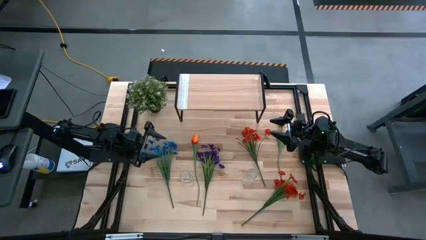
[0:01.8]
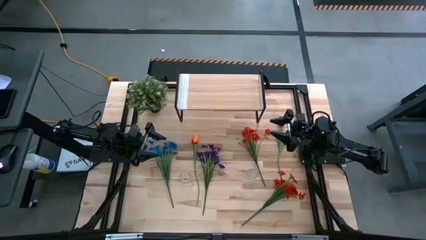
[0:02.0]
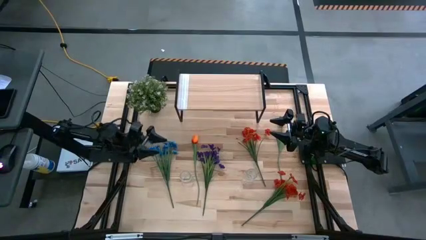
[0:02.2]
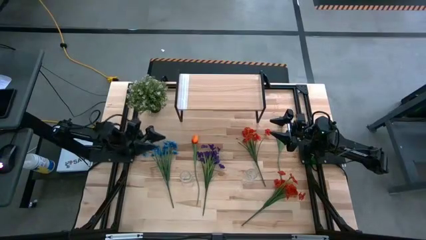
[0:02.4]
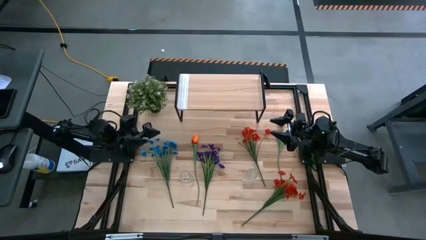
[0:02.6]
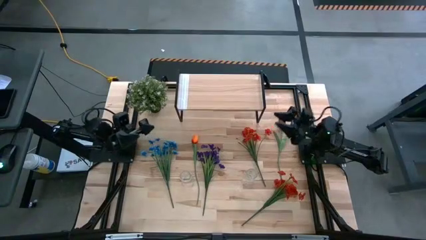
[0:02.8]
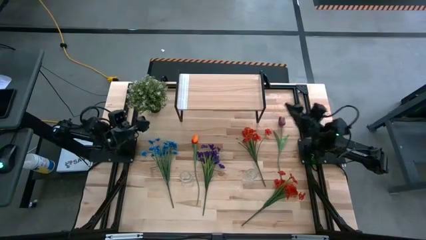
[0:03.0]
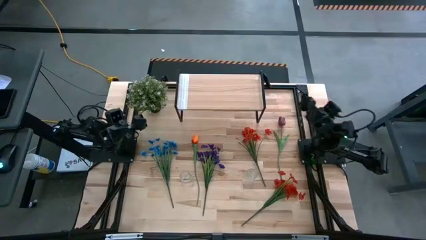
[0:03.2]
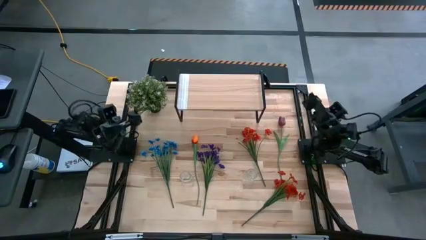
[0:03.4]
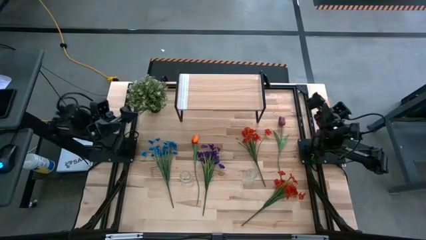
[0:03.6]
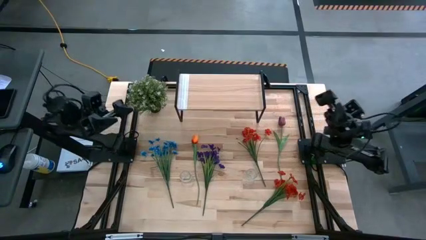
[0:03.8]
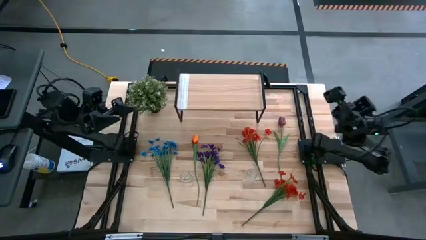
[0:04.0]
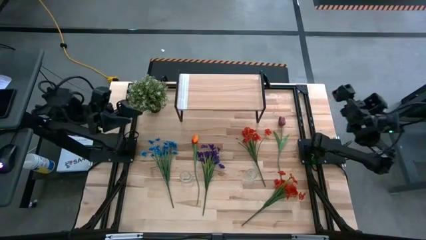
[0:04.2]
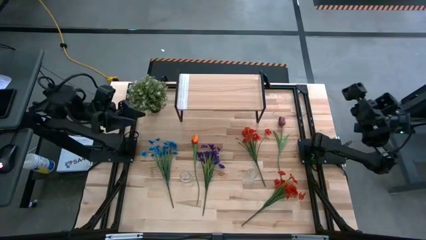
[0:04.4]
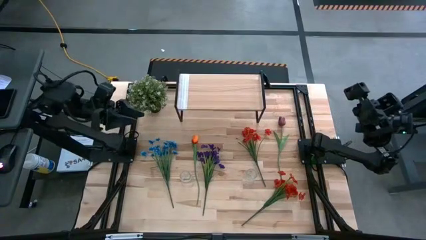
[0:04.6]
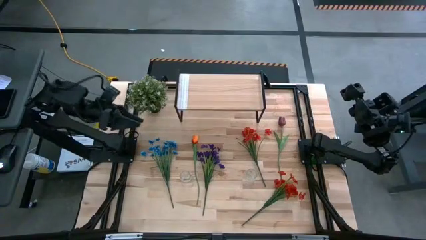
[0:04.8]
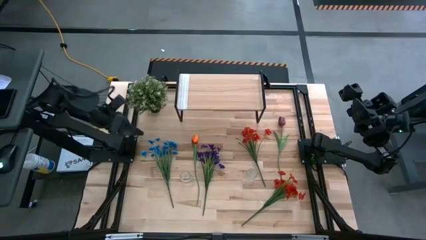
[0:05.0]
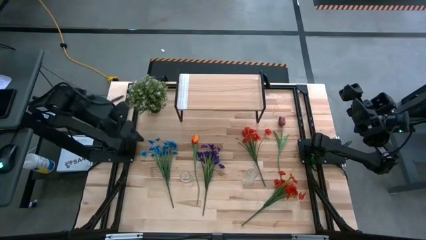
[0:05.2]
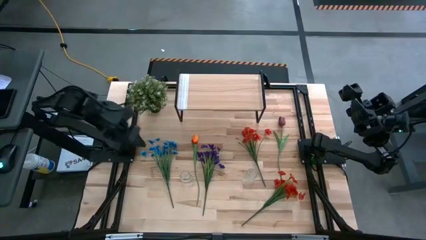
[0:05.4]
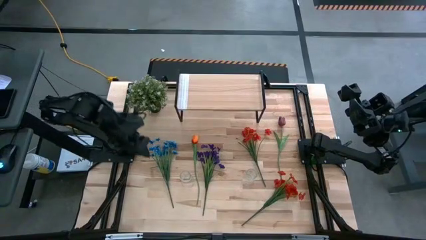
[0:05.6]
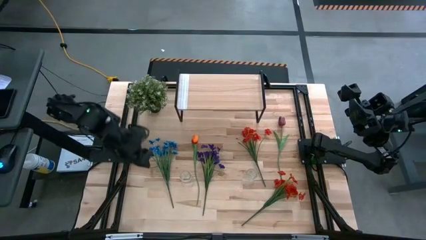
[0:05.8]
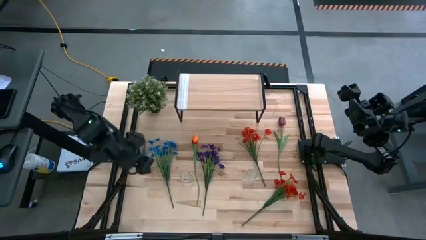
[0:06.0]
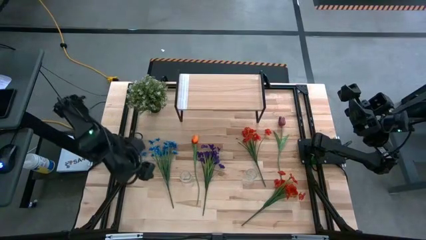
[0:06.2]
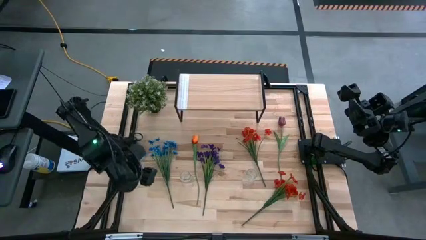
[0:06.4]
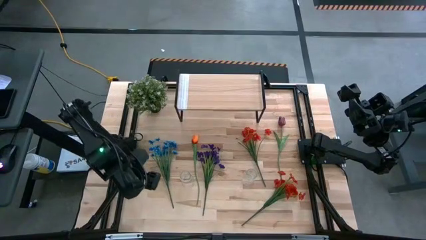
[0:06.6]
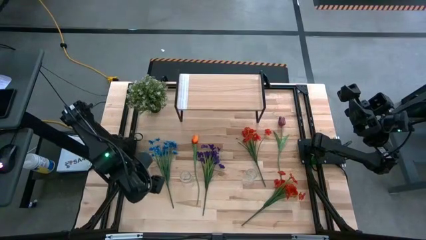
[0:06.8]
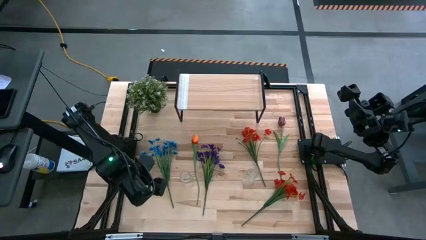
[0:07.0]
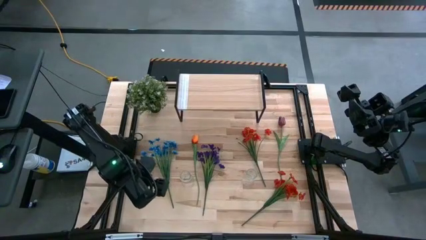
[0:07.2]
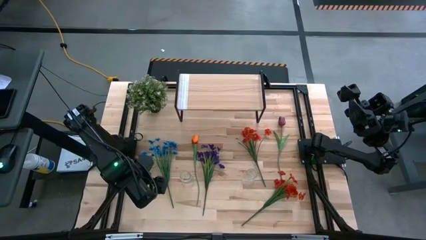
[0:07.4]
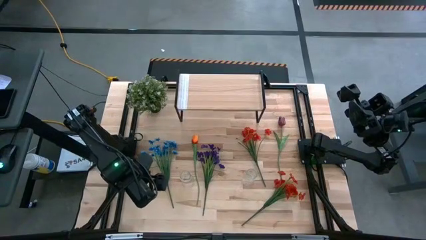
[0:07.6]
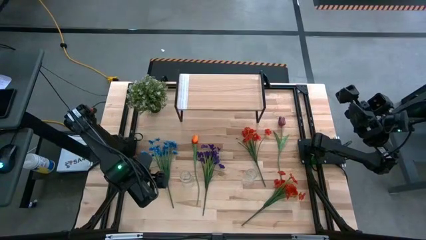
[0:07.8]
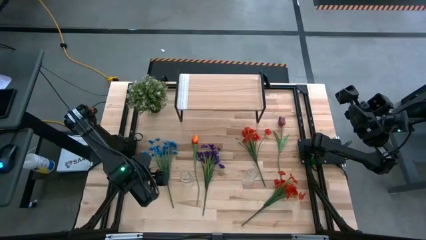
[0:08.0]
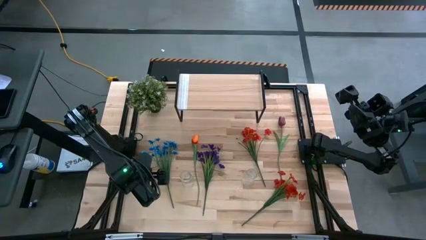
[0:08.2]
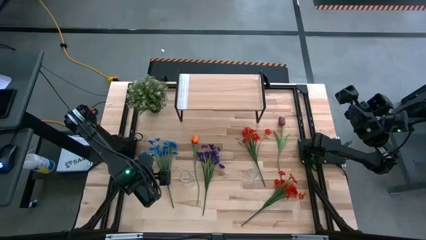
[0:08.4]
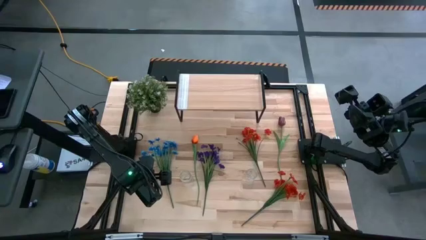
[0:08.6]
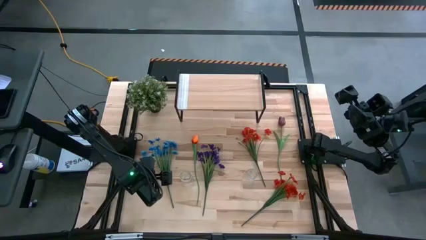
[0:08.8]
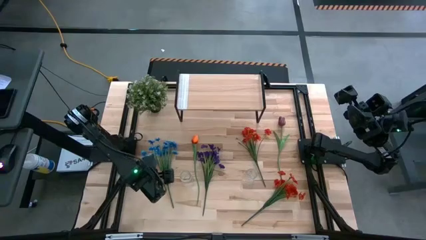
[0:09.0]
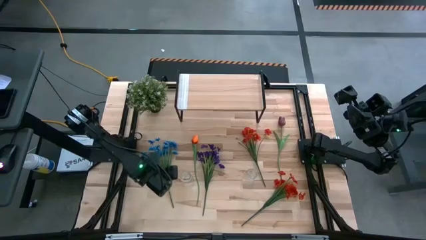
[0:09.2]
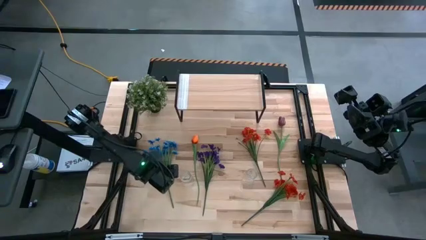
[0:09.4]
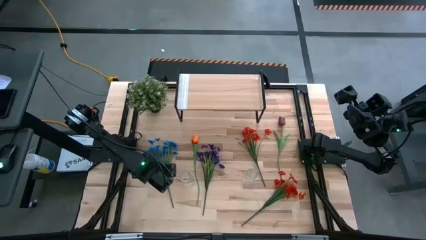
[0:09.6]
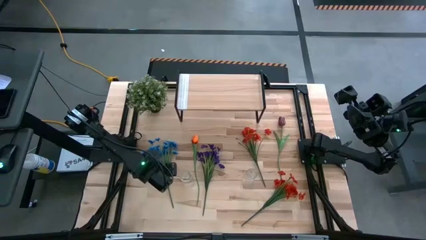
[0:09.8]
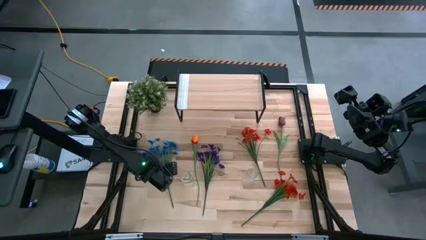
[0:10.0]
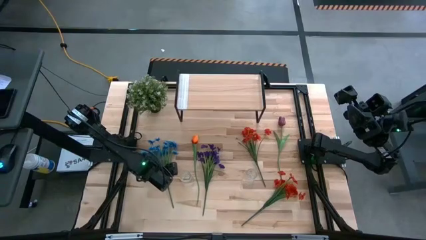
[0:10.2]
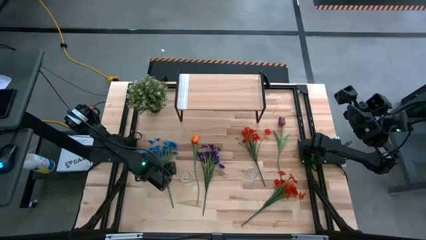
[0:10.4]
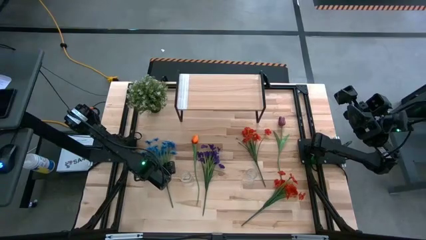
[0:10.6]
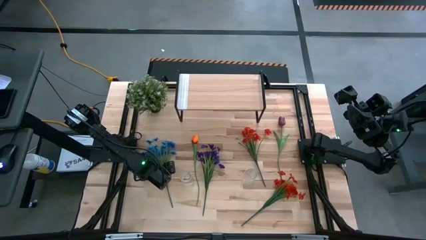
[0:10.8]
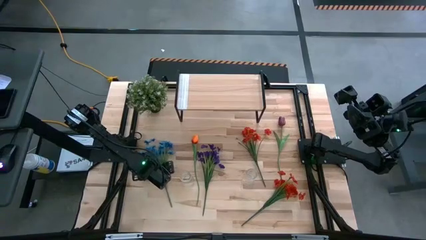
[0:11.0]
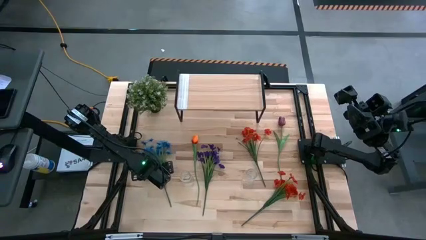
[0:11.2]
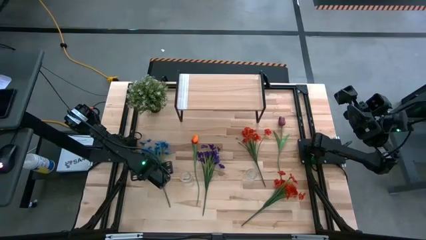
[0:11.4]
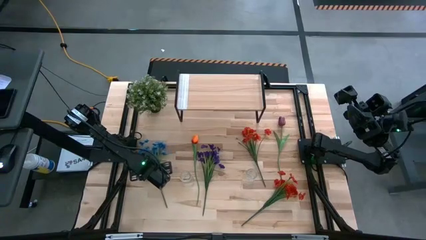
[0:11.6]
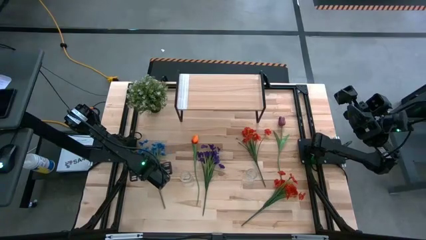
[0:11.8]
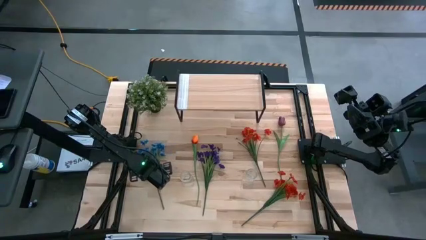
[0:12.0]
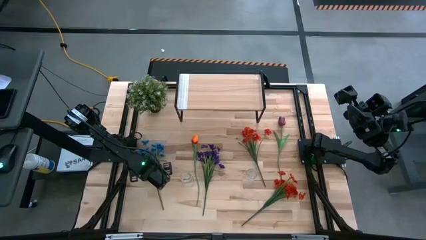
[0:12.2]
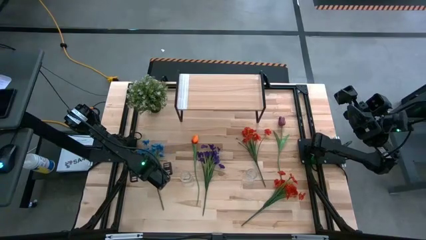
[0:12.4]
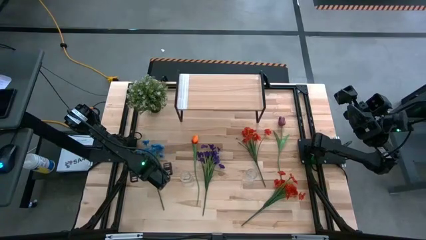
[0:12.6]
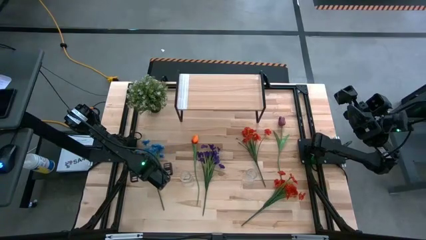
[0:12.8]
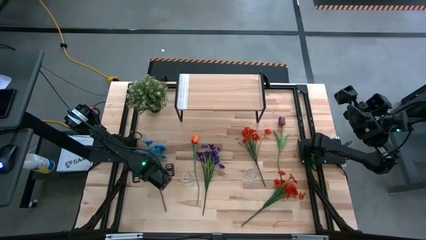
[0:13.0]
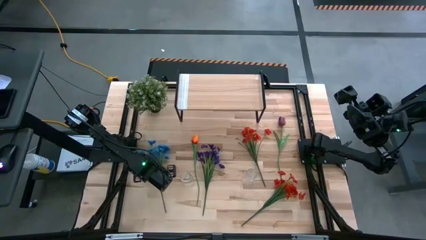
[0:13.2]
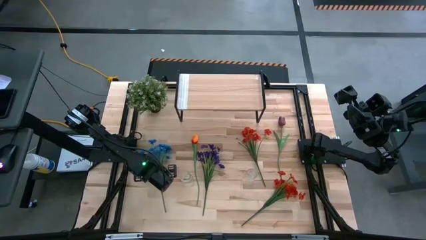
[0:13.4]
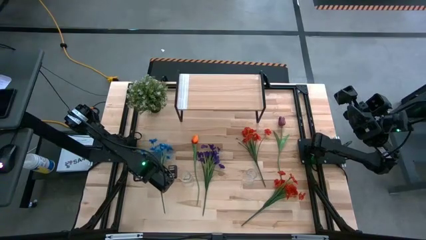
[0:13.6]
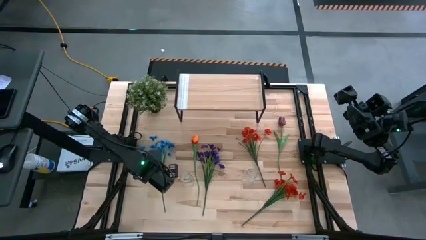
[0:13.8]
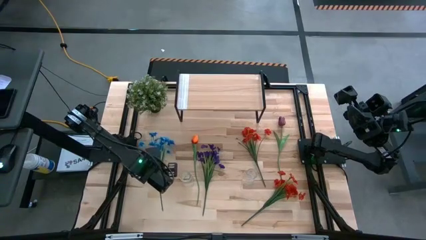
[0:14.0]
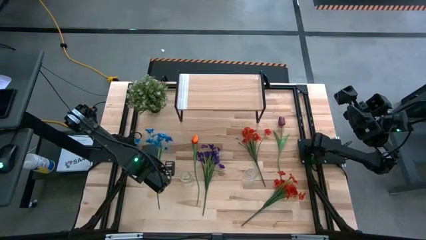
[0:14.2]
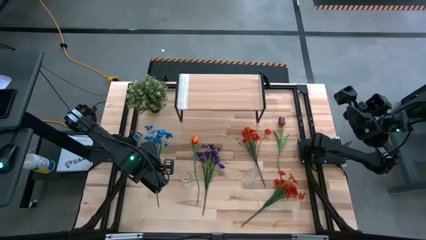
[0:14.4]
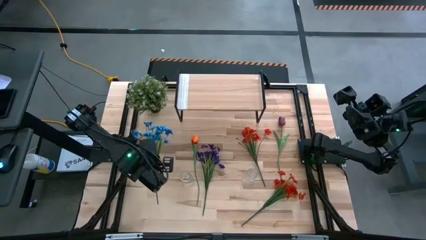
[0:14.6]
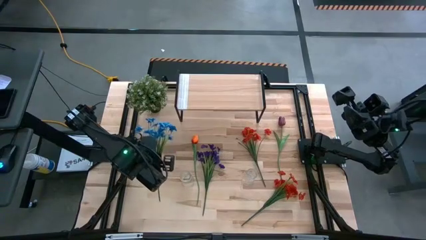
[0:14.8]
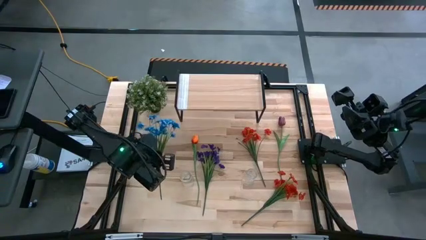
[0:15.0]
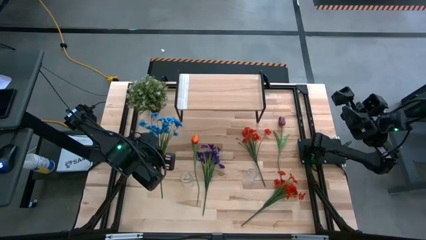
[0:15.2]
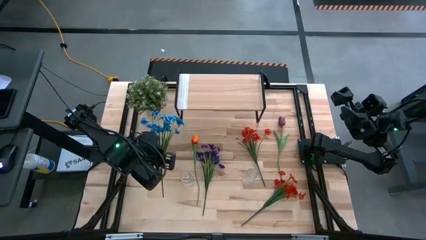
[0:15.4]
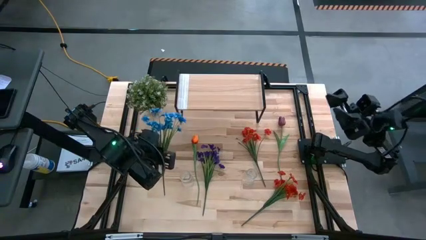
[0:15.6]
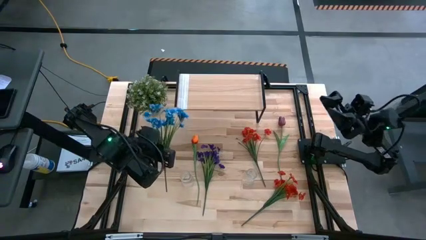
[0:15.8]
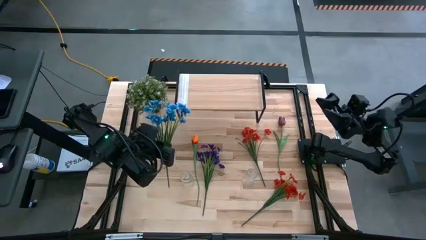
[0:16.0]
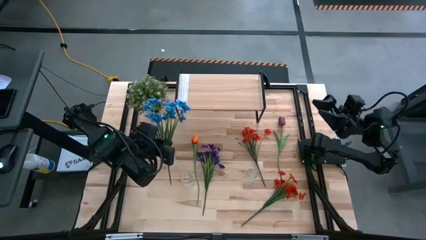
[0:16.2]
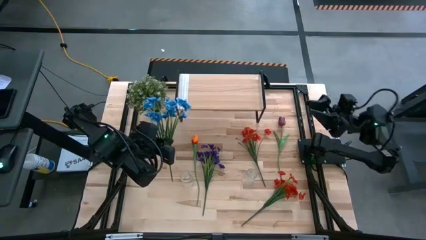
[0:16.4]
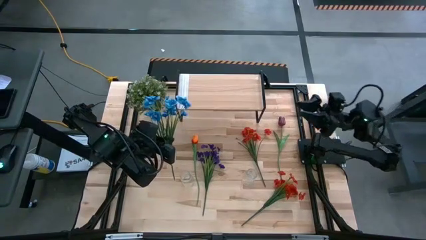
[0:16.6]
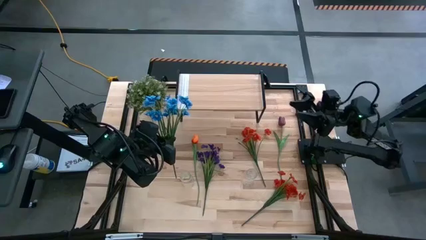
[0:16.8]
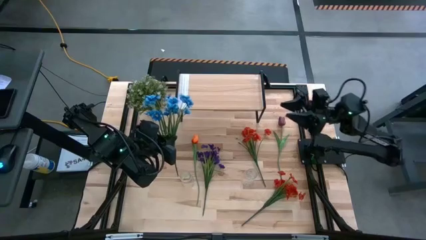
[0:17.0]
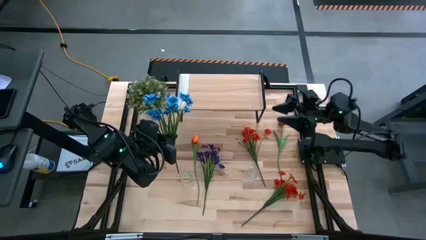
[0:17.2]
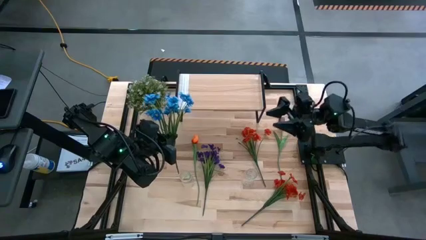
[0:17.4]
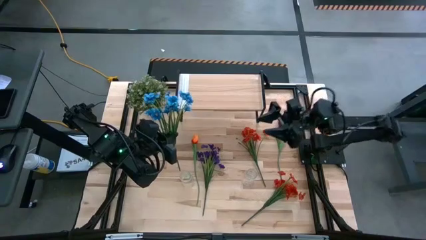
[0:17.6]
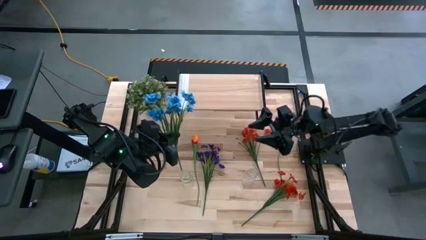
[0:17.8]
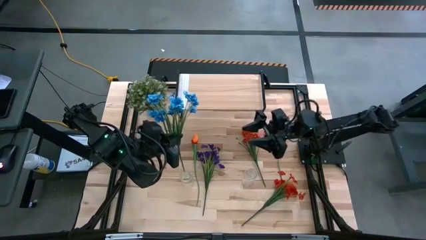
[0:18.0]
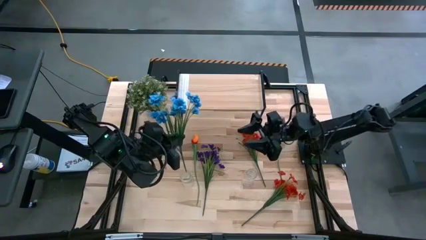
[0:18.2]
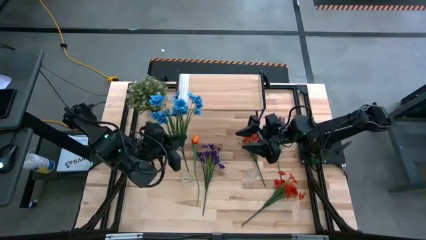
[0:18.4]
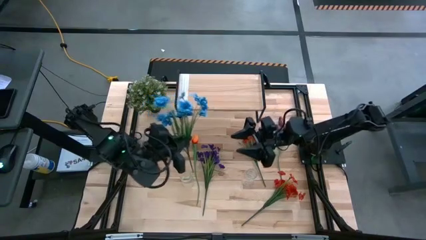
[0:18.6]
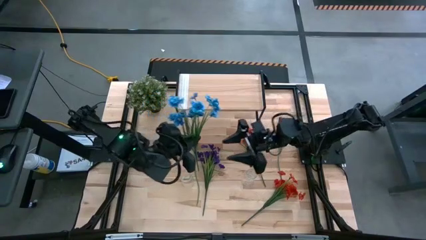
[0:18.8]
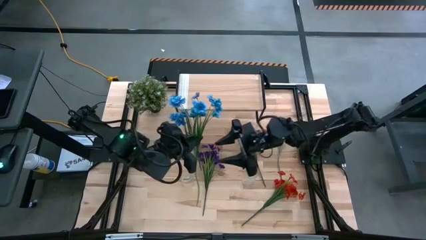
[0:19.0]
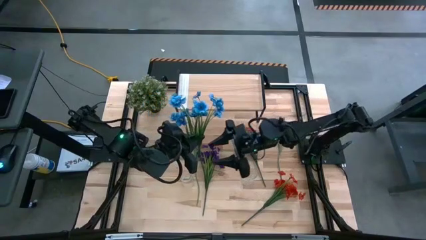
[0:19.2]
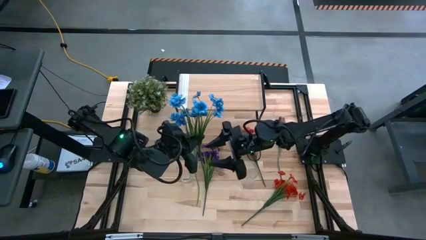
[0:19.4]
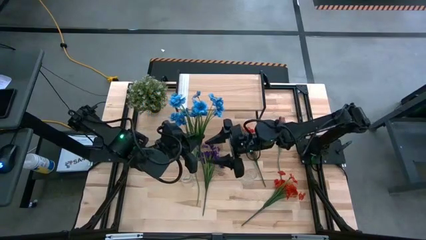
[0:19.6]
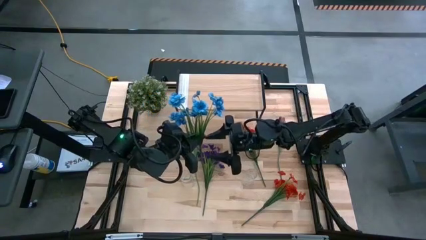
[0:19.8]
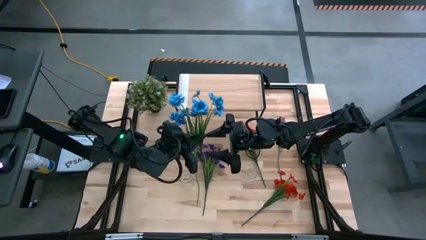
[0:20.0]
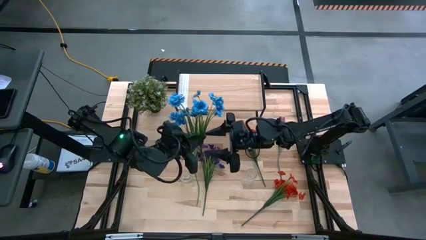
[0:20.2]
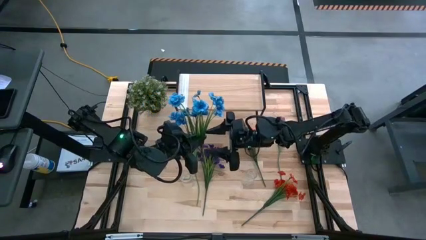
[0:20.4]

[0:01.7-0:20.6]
Task: Pick and place flowers into a vace then onto a shelf
Put the blue flowers into the right transparent vase
